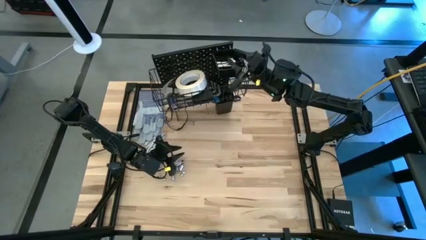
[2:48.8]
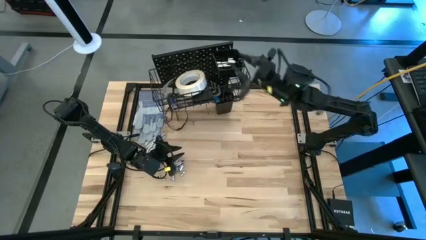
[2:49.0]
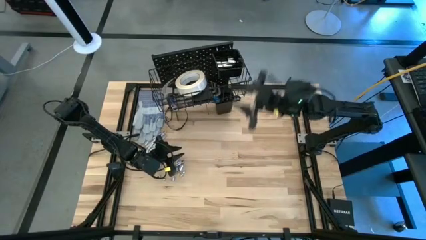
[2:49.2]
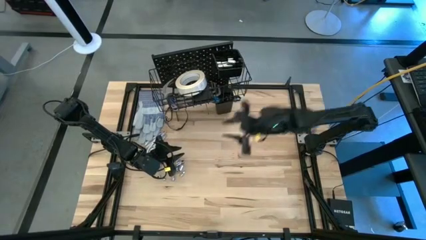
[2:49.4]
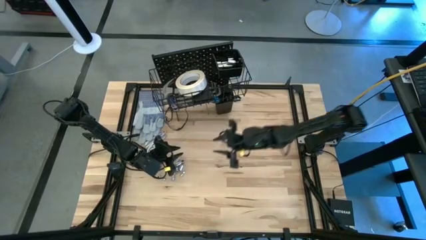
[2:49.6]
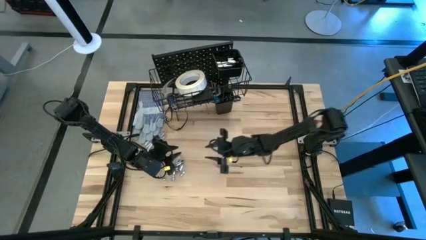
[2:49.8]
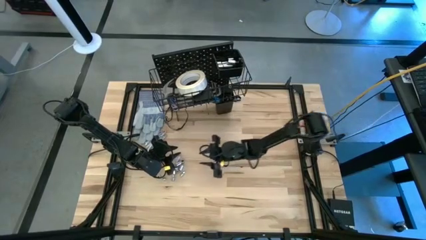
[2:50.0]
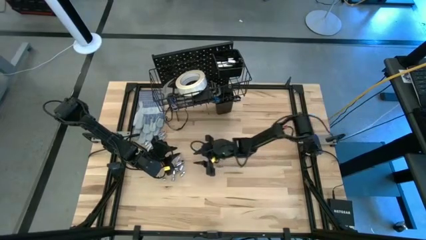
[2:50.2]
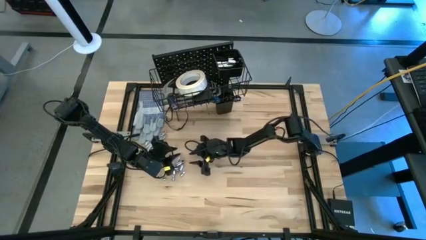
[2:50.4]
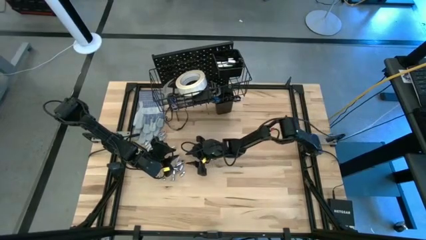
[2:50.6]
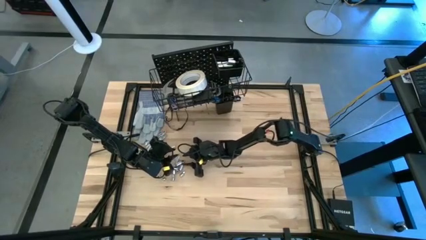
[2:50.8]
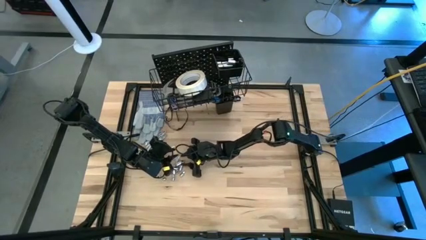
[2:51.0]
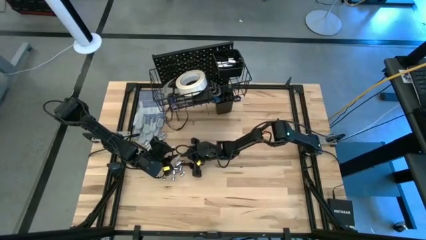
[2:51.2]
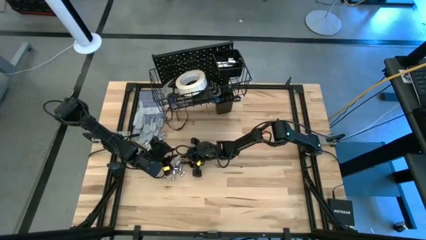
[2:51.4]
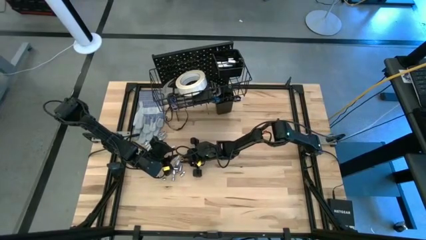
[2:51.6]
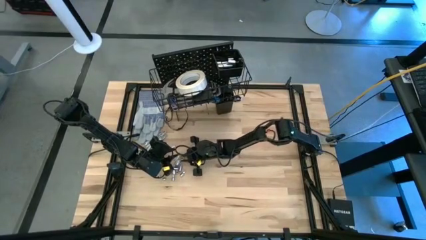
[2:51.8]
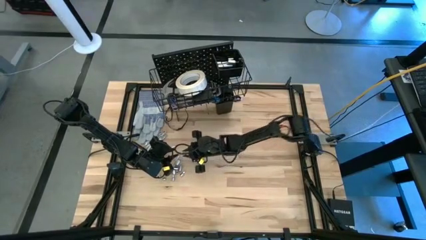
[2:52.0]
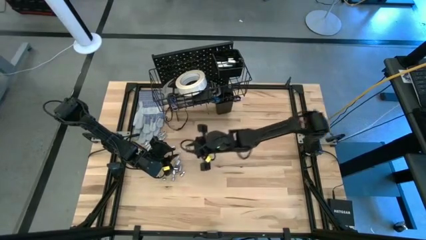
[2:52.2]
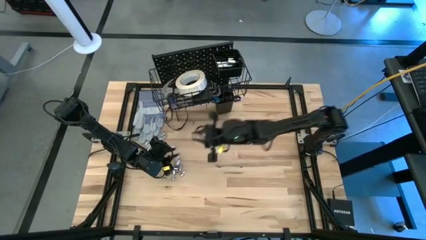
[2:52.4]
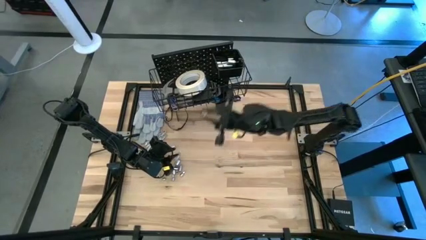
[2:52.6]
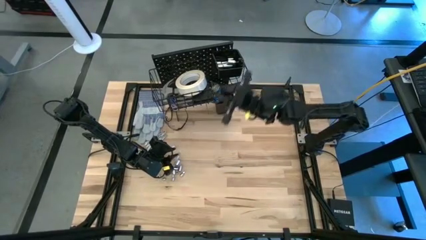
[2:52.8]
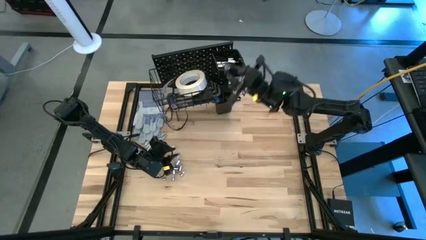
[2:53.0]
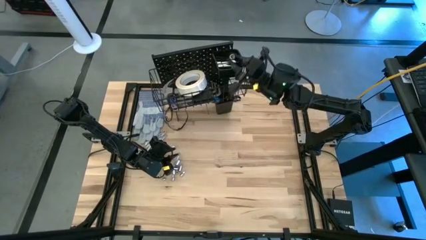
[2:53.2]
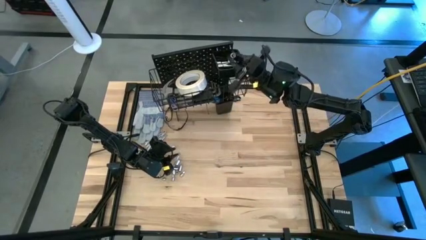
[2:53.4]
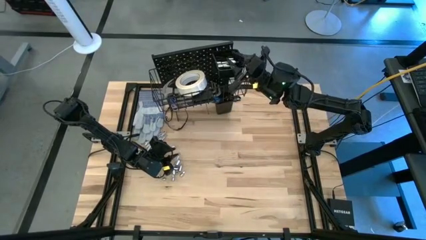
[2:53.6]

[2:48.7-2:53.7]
Task: Hang tools onto peg board
Put the socket into the top black bin on the pegboard

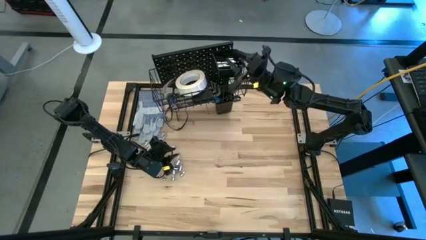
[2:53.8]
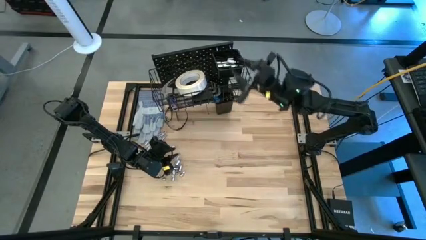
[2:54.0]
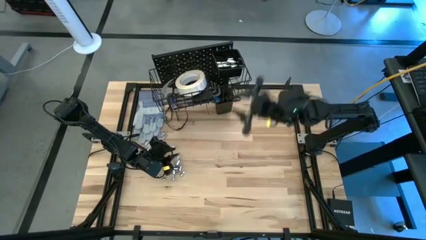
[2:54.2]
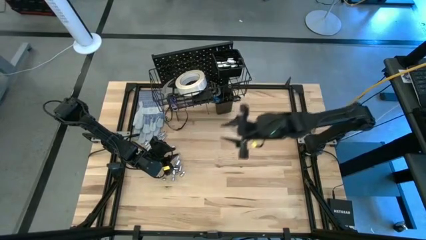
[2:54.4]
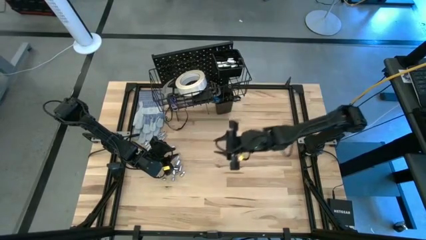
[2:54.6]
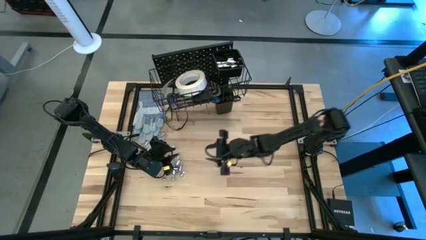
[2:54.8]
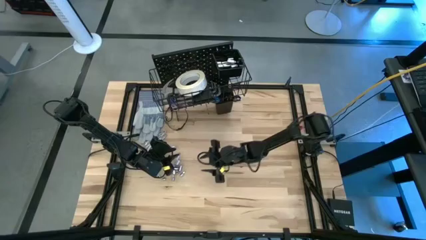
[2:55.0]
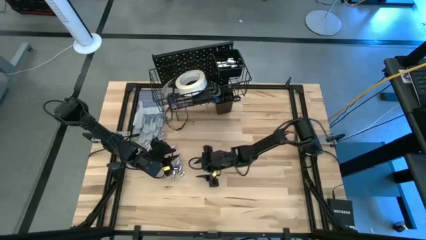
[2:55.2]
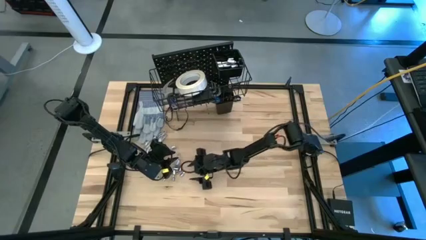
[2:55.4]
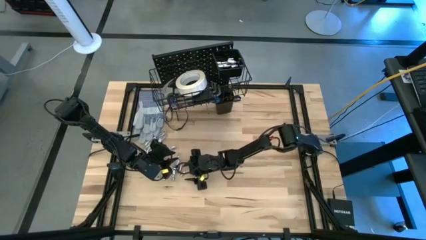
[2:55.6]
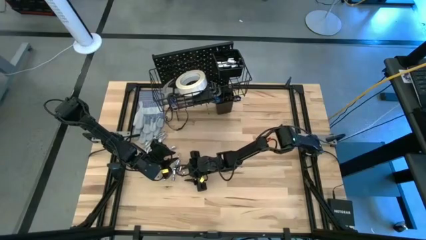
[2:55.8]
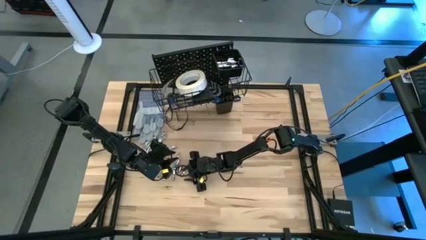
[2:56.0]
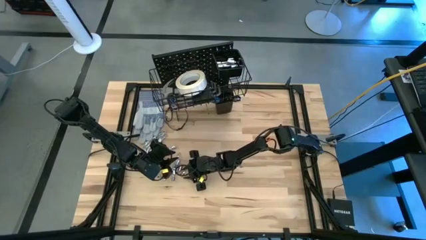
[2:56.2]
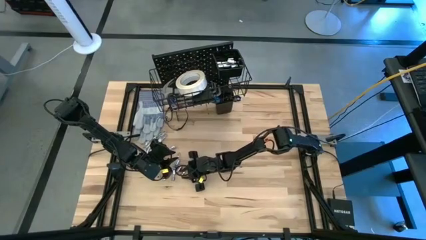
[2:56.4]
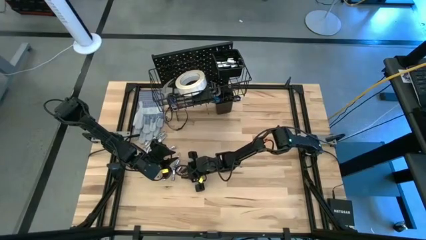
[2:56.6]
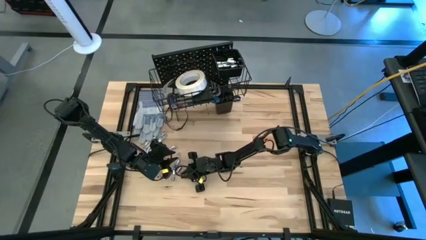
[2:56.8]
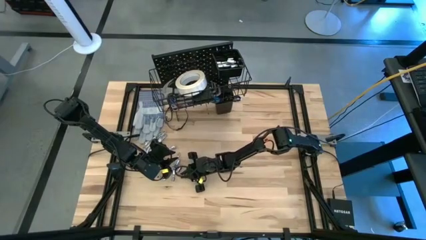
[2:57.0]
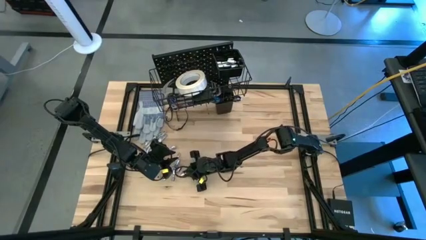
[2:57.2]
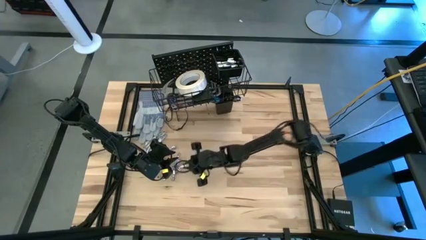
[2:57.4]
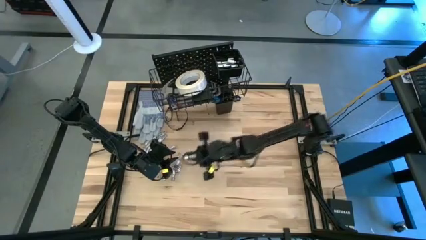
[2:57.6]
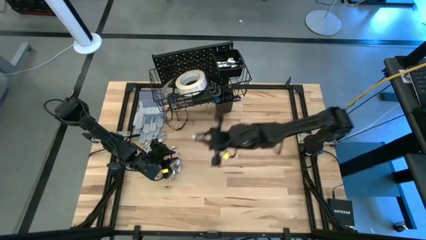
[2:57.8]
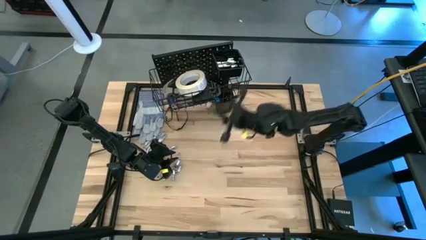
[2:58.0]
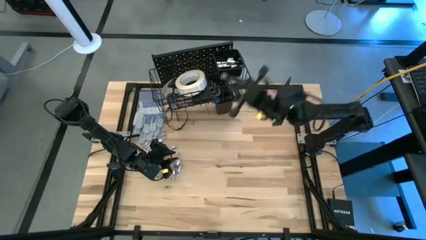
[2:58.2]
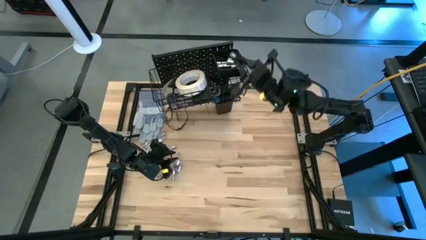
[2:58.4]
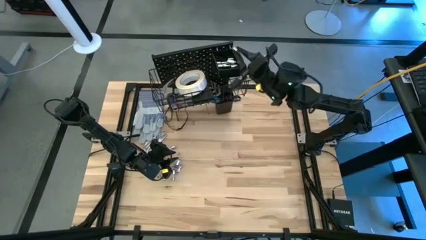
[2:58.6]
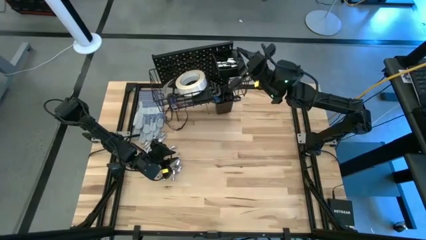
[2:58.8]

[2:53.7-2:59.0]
Put the socket into the top black bin on the pegboard

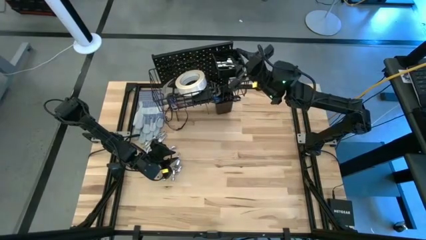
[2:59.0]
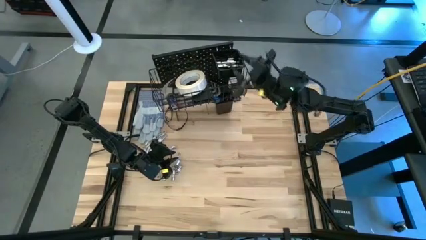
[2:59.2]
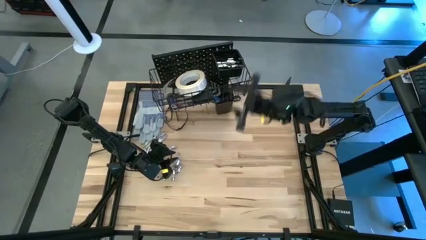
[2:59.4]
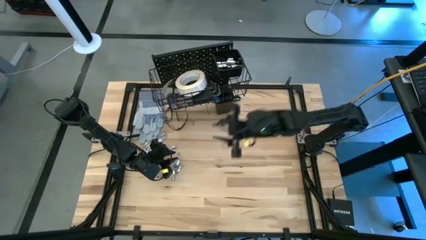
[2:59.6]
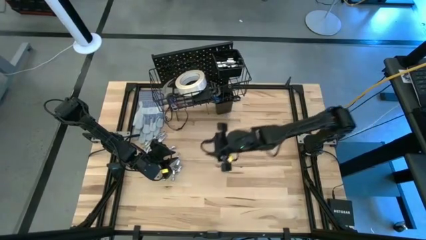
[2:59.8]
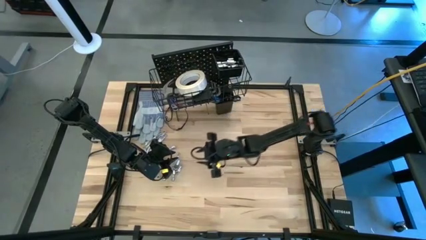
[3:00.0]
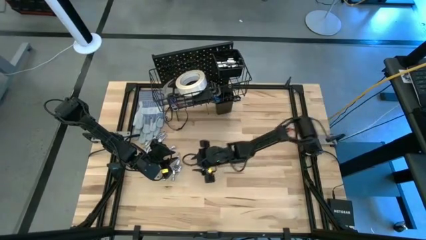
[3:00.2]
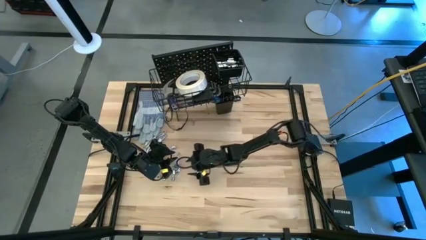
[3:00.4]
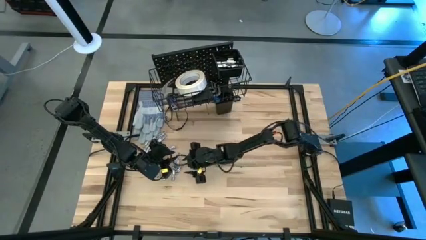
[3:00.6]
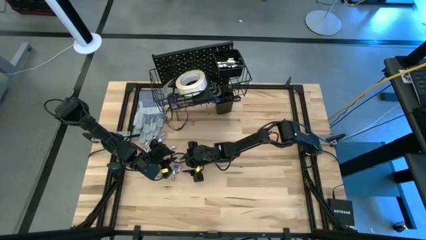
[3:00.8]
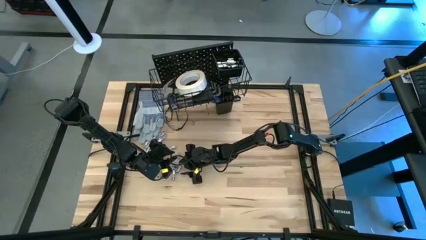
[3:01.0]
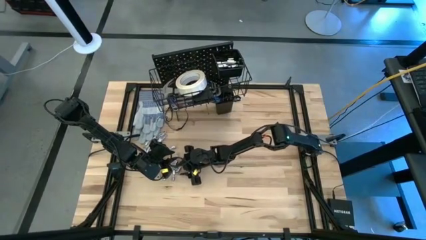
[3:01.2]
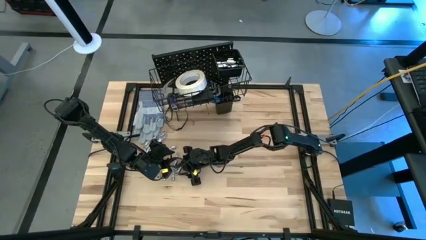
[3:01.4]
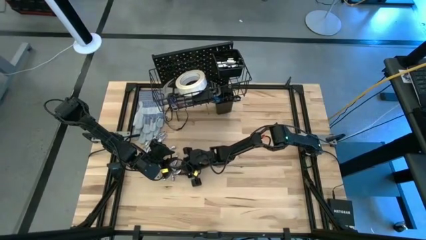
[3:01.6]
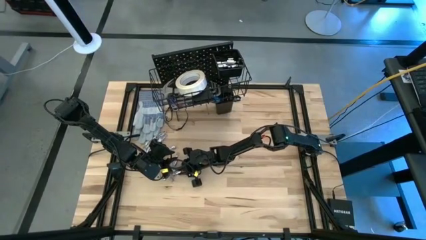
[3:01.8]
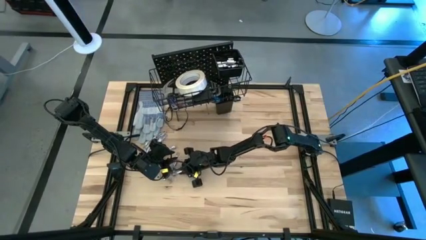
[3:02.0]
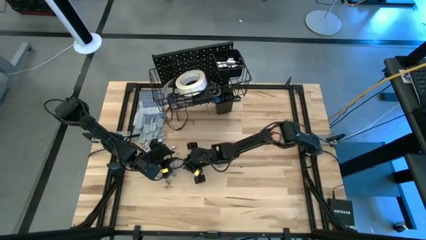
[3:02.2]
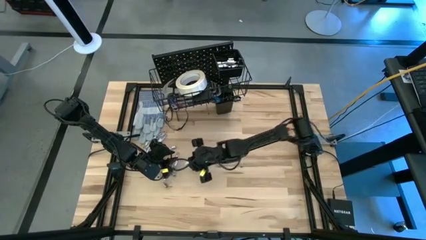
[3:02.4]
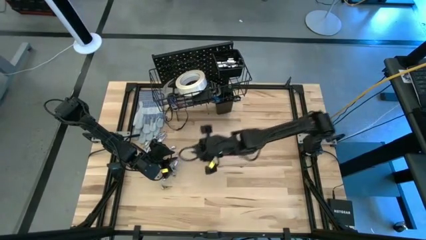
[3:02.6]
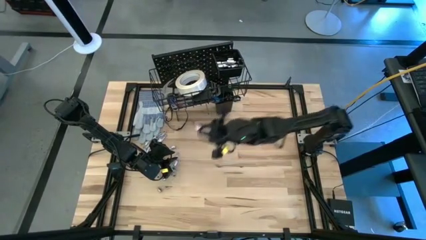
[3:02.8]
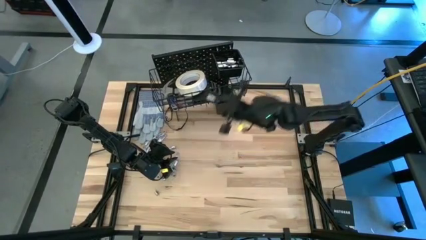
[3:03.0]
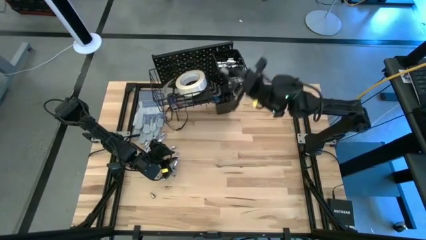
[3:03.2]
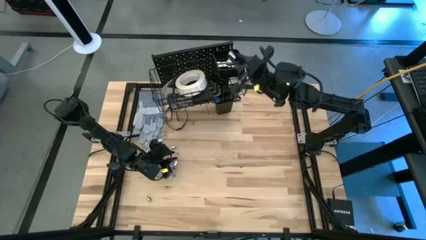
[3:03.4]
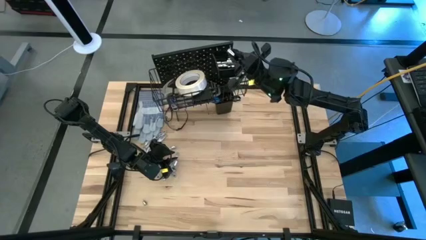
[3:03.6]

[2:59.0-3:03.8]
Put the socket into the top black bin on the pegboard

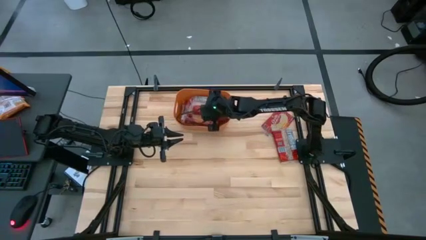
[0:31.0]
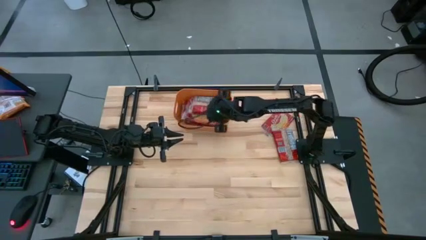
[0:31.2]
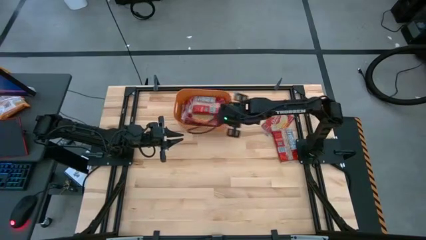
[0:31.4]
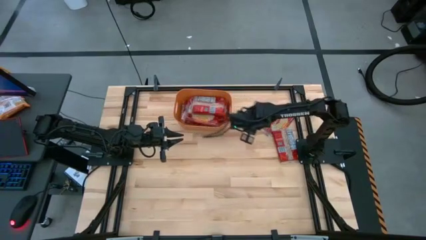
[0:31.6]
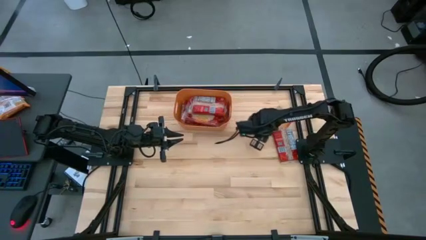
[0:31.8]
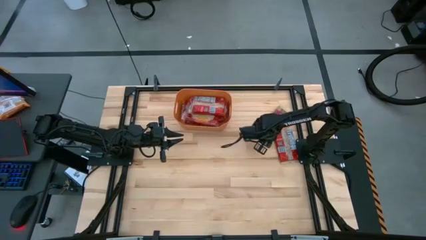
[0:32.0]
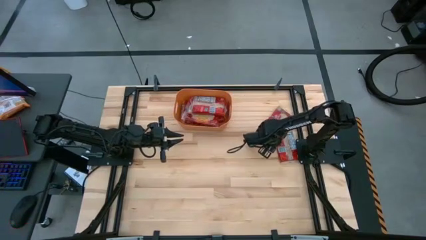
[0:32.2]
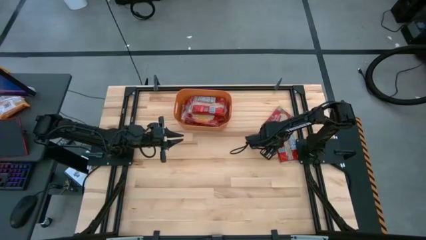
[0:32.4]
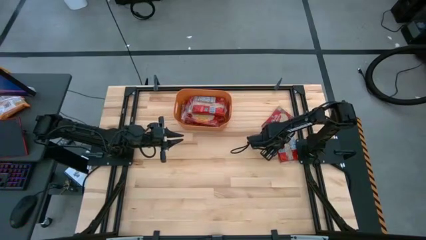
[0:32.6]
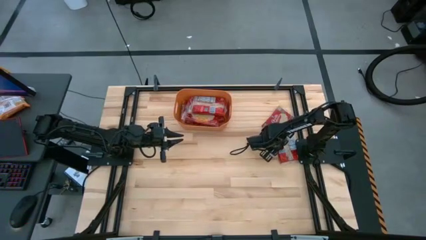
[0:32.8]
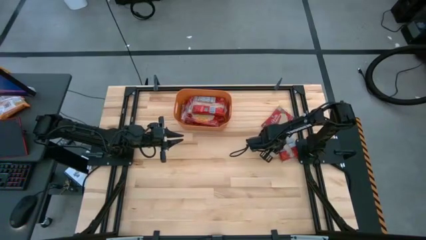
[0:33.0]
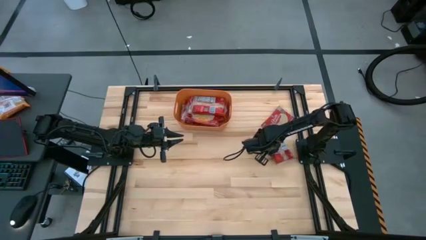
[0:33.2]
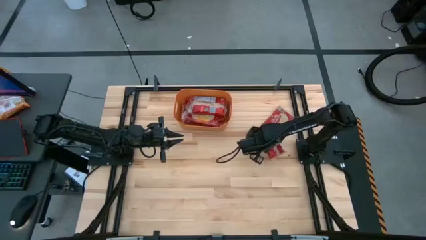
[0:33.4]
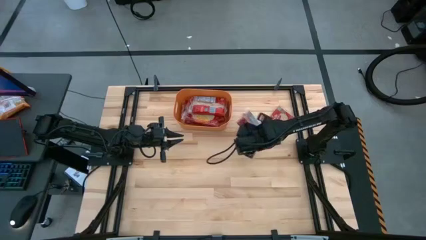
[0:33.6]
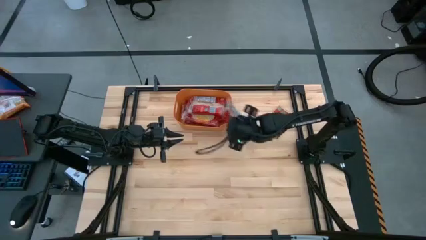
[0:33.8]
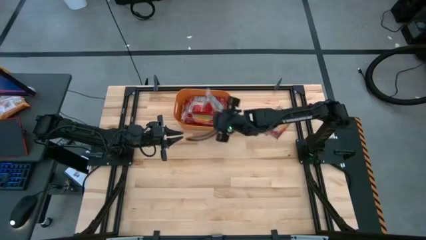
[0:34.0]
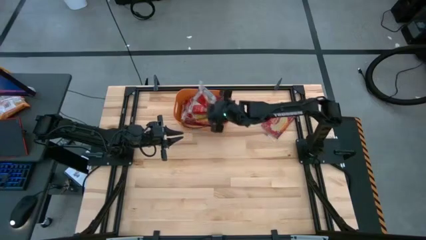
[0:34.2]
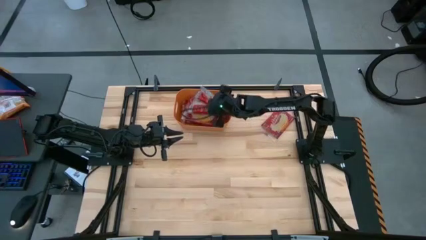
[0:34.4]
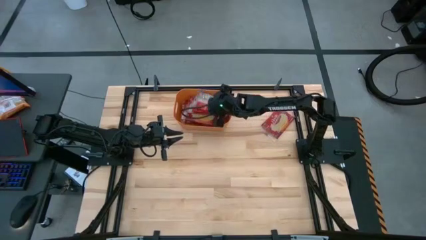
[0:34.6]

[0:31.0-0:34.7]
Task: Sort popcorn bags into baskets
Put the red popcorn bag into the orange bin
